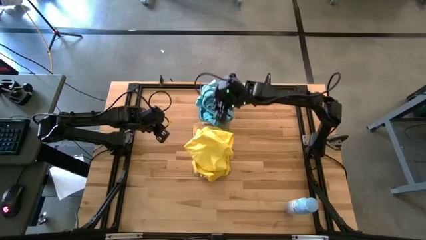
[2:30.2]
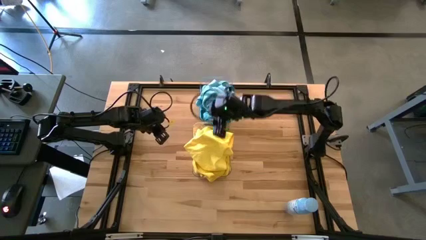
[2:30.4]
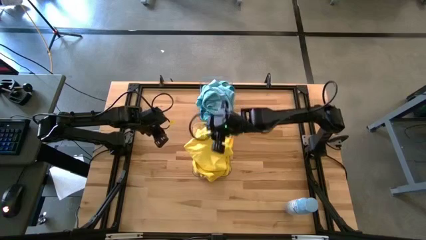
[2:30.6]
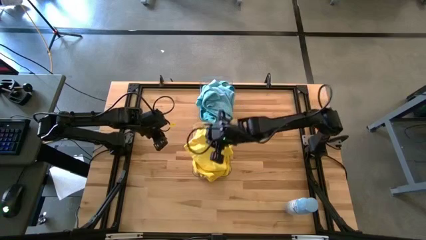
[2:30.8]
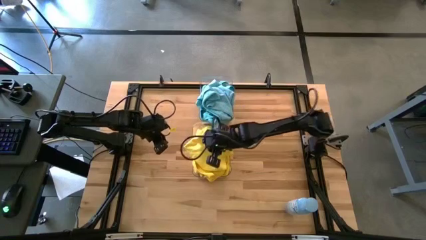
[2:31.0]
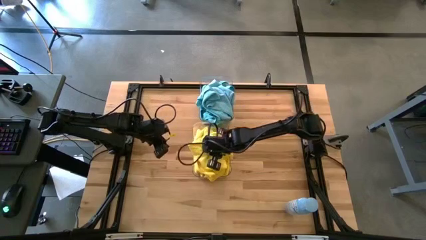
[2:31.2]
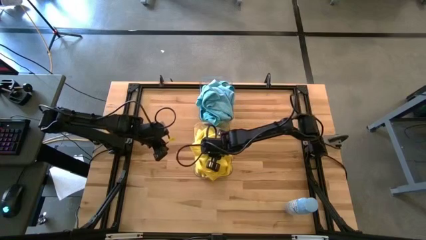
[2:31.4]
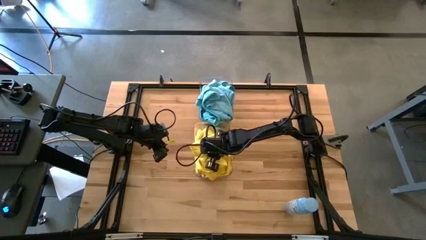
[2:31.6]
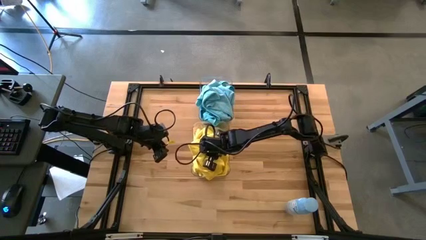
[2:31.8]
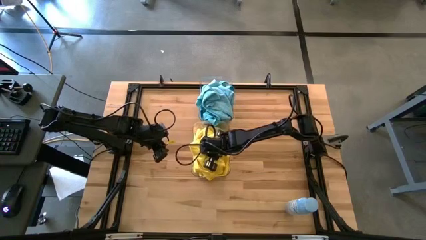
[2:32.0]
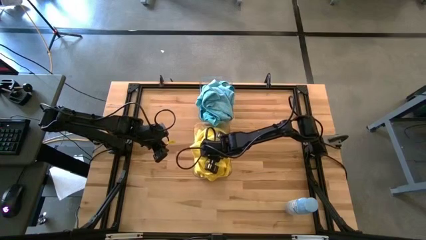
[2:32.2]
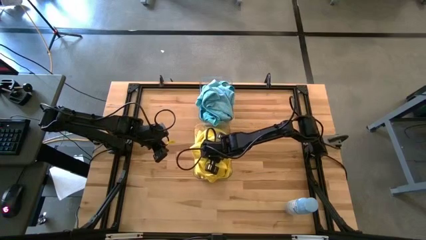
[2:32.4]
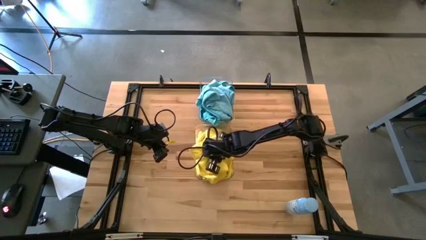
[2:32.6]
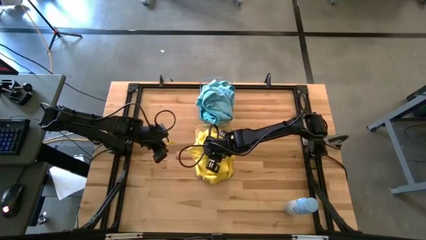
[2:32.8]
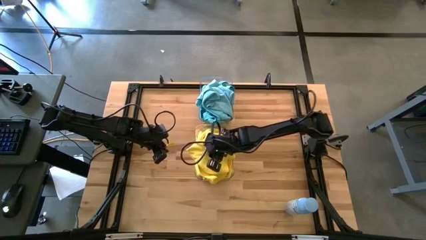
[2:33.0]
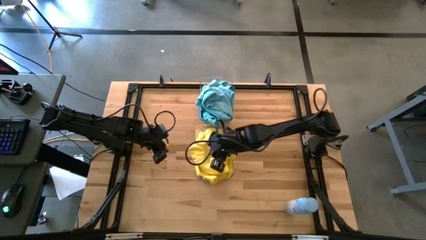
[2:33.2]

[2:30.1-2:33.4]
Task: Sort microfiber towel by color & place in baskets
Adjust the yellow towel

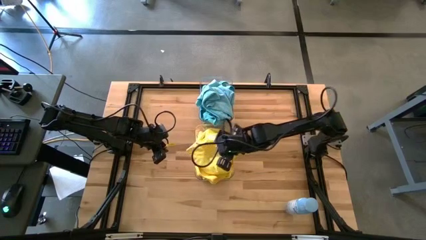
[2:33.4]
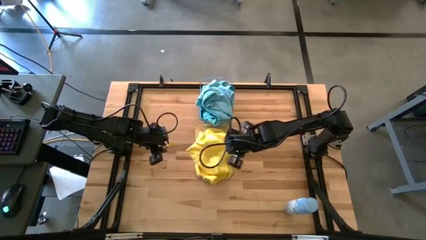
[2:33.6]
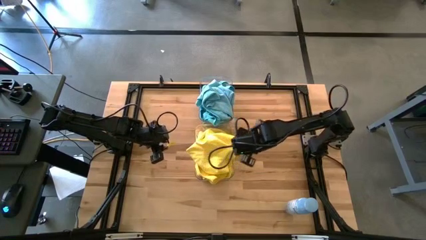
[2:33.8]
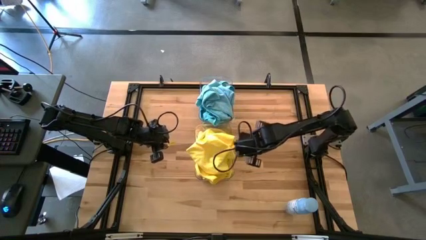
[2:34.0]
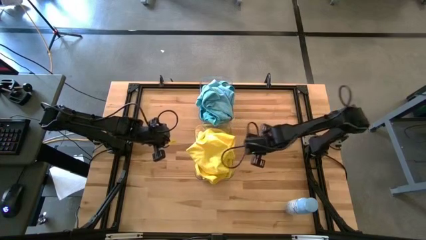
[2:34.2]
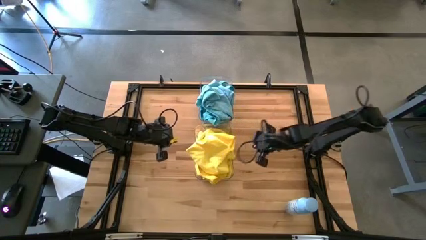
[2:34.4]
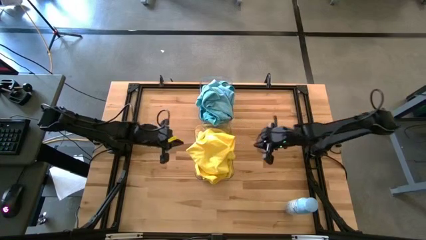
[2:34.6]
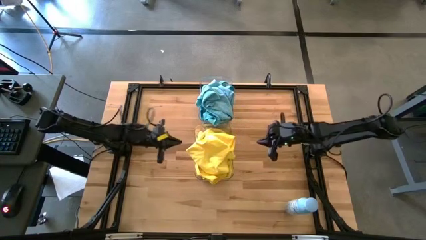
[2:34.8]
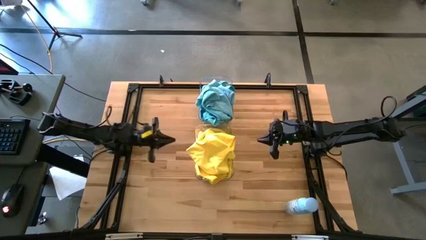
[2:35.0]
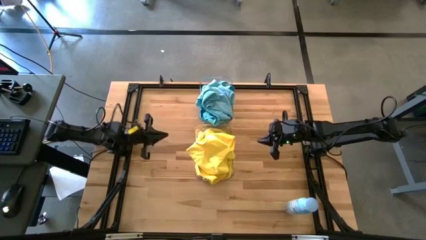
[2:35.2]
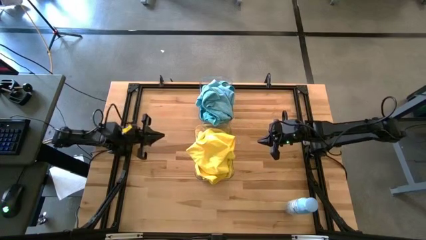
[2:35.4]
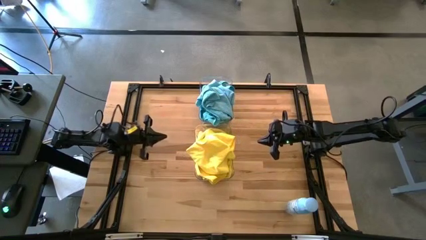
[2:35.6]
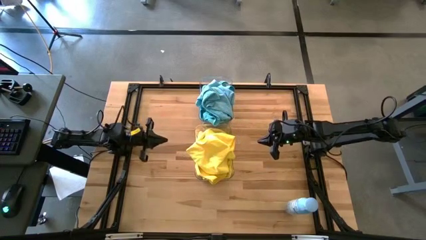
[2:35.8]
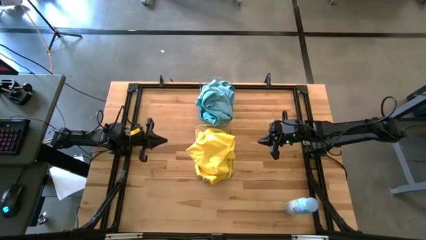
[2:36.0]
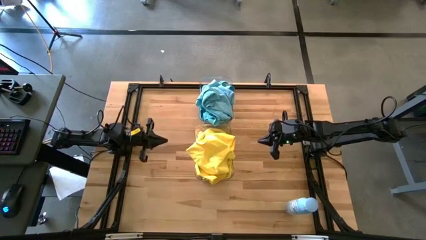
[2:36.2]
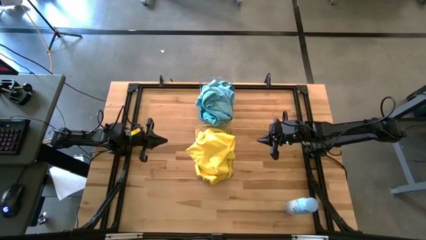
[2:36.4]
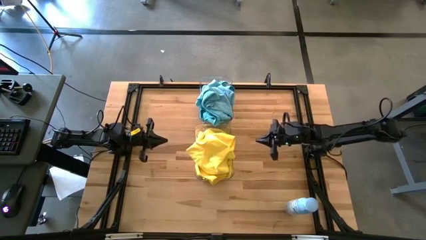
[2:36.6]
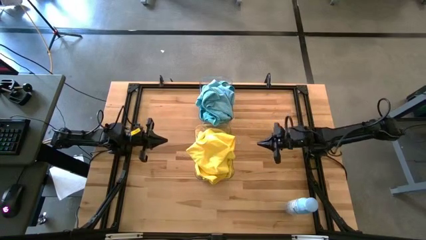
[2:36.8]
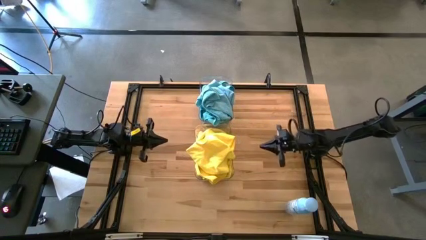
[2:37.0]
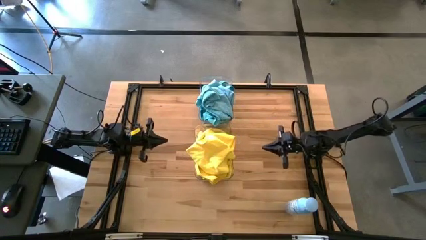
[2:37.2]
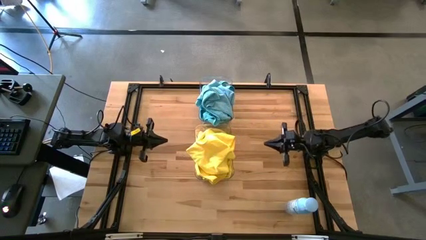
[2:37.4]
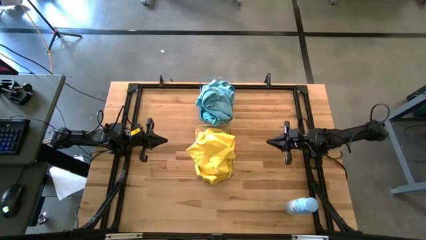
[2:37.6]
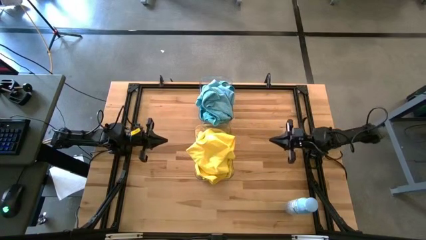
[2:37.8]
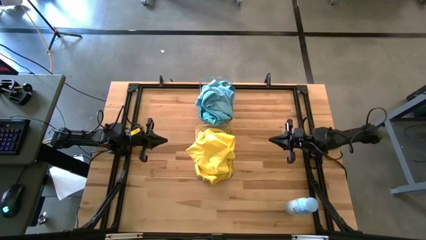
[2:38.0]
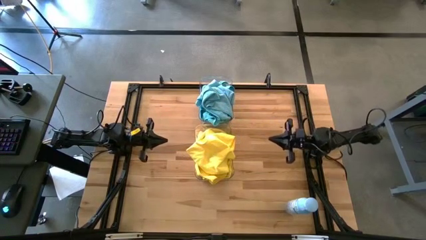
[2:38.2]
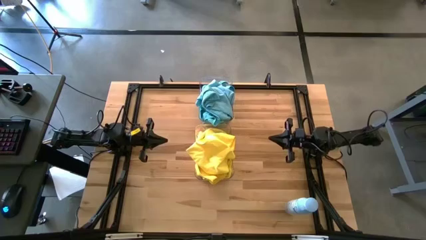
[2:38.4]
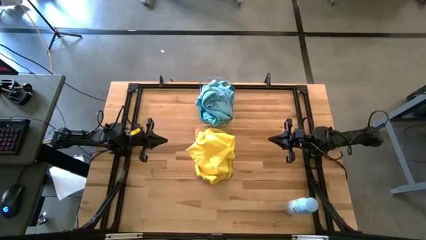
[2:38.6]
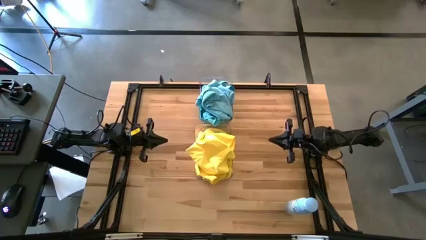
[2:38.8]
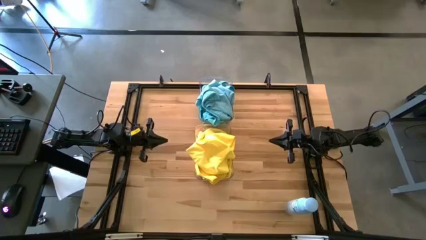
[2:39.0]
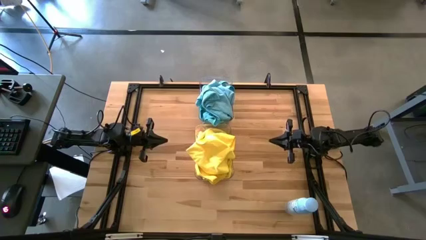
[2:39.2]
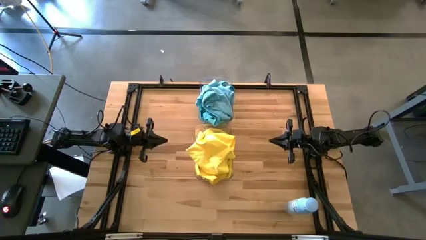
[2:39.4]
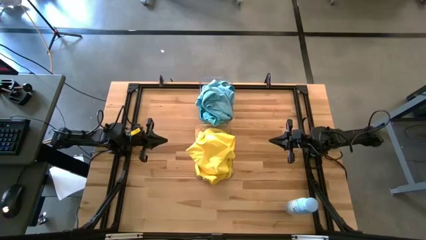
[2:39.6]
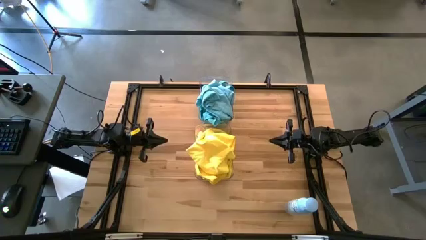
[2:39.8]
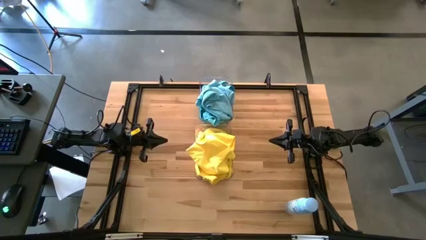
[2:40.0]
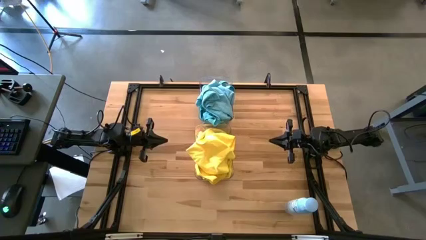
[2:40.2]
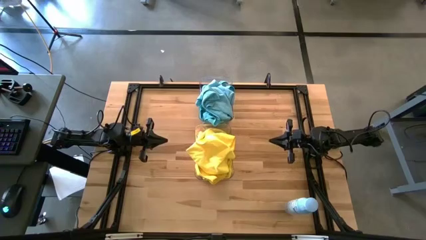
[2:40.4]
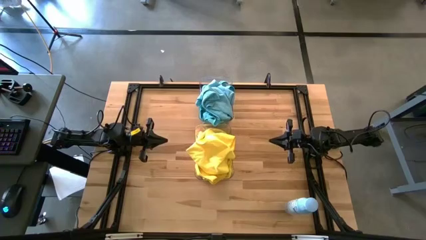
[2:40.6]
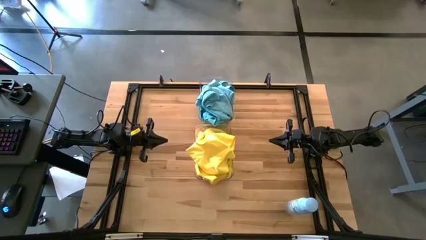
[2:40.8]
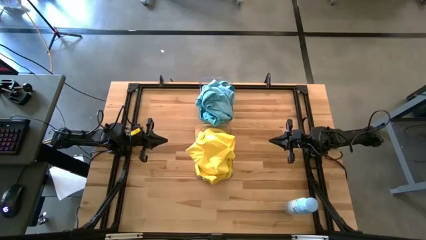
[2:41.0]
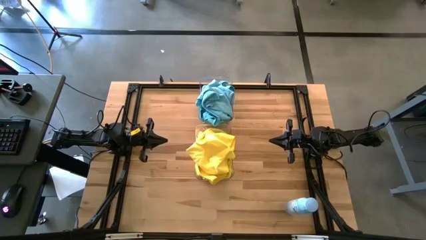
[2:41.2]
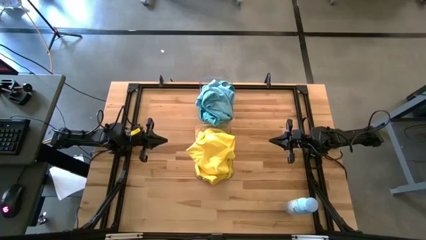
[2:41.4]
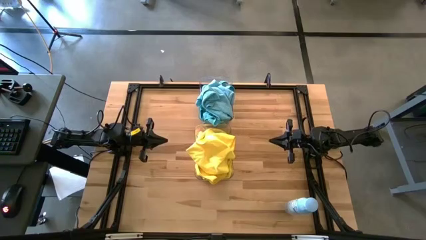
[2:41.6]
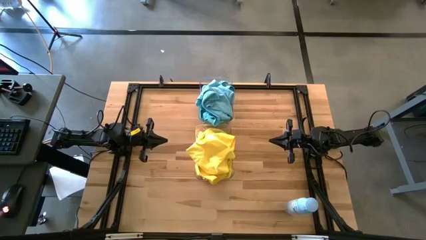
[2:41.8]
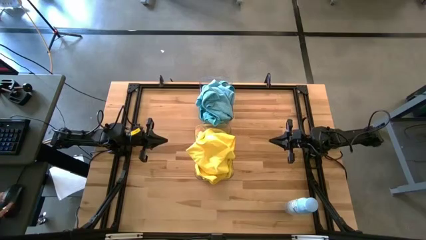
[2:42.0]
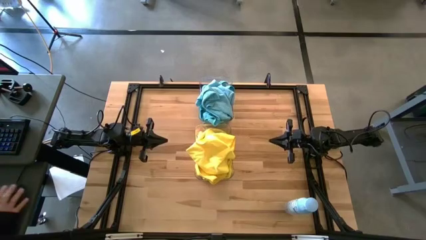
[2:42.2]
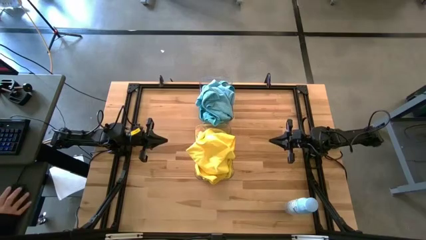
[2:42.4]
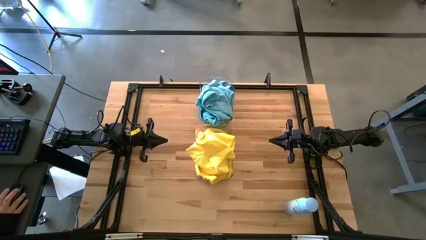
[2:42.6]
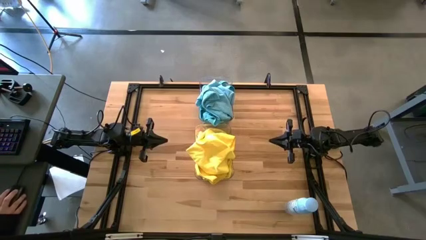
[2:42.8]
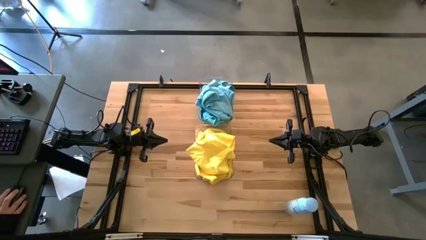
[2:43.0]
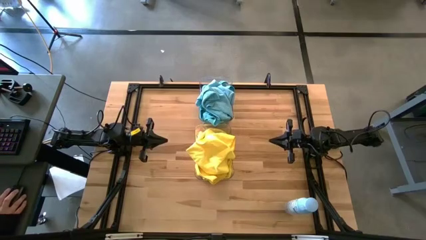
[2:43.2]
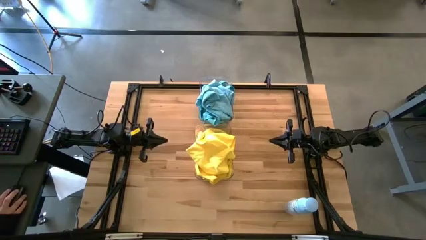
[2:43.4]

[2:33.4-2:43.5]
Return to Home Position

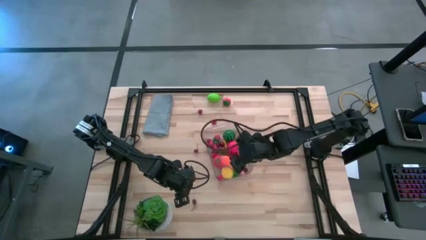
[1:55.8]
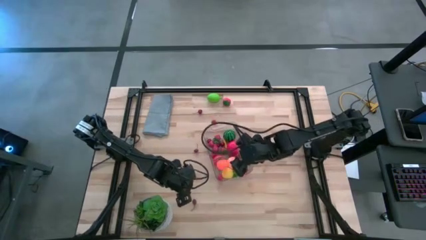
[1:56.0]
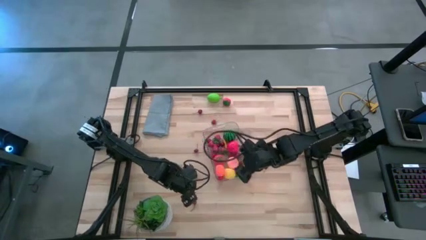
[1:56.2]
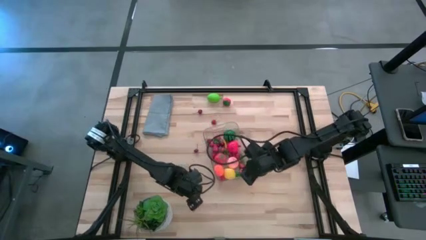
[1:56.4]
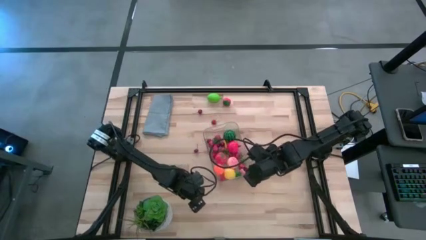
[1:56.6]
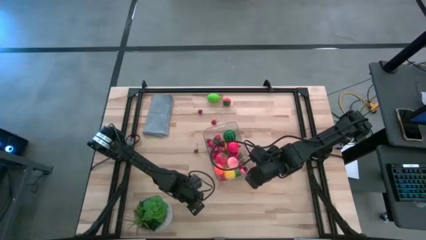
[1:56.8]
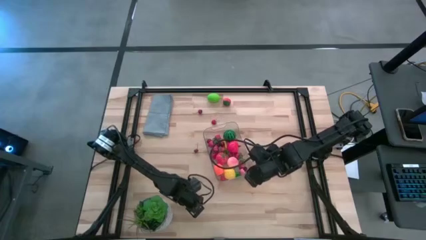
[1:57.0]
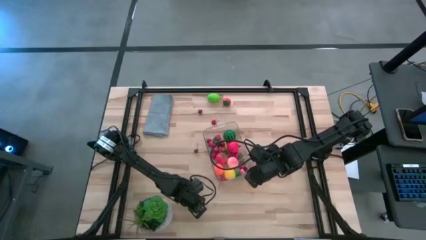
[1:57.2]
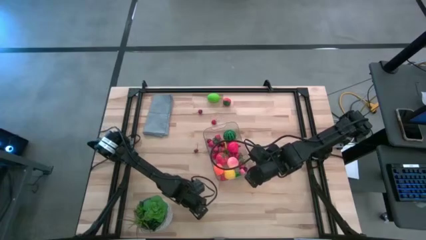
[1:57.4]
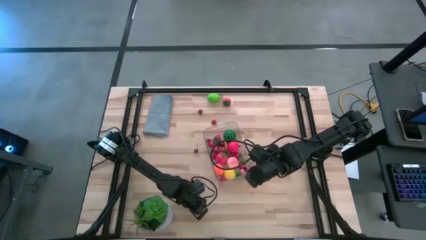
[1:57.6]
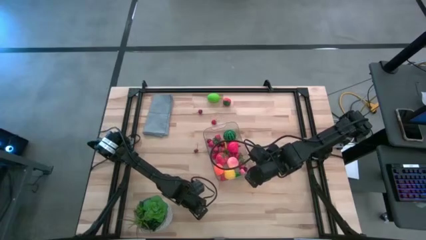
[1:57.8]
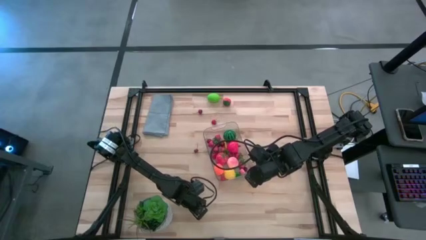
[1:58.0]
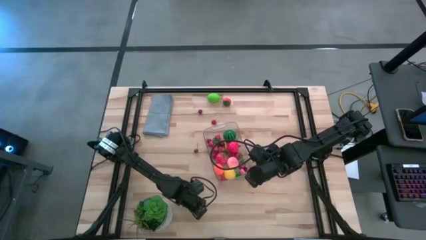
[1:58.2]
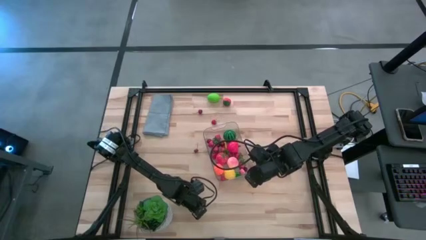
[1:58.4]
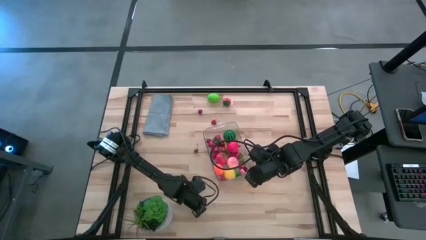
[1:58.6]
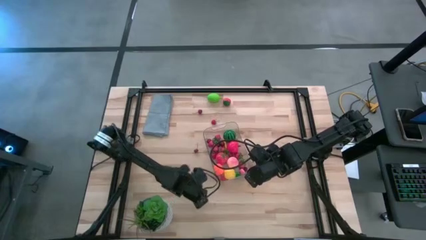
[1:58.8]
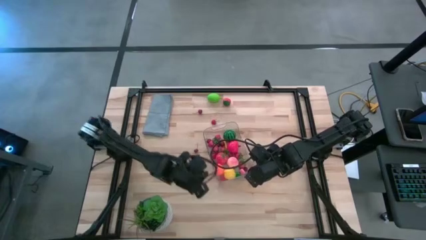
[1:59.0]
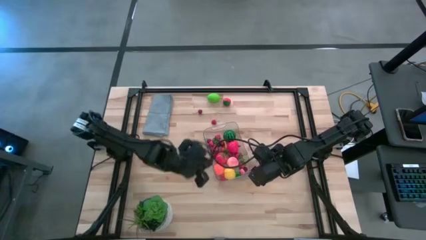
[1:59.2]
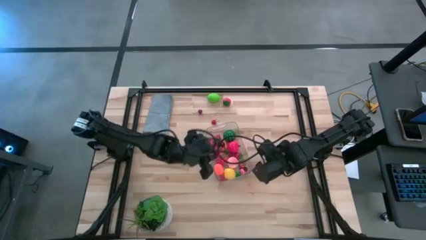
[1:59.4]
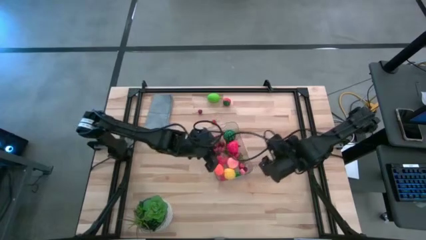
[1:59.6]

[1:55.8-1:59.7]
Task: Pick and placing Produce into tupperware
Put the red cherry into the transparent bin
